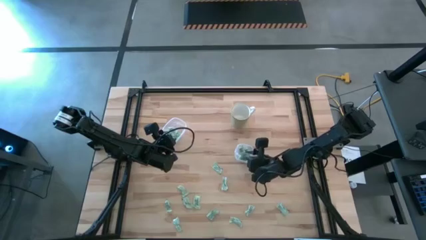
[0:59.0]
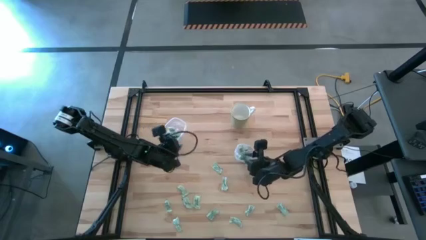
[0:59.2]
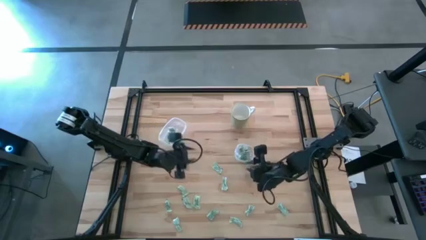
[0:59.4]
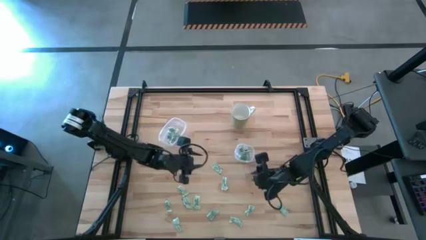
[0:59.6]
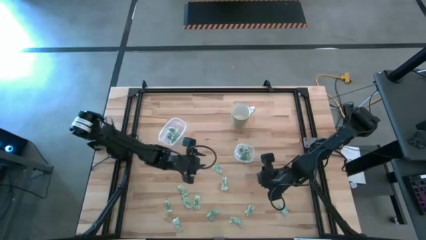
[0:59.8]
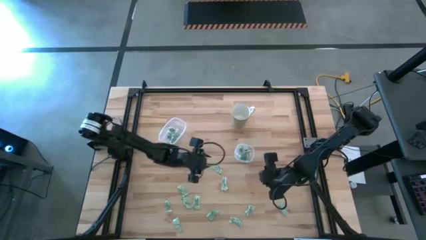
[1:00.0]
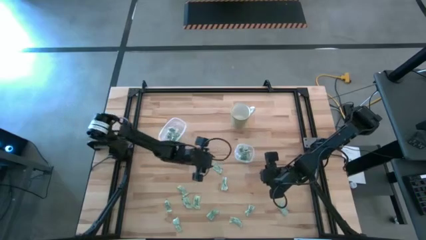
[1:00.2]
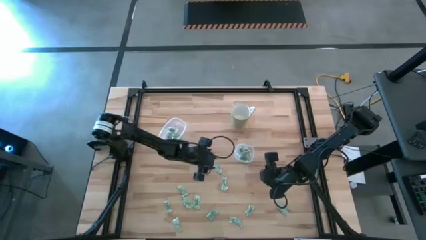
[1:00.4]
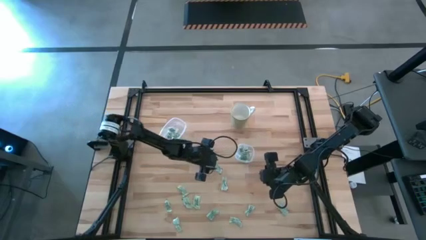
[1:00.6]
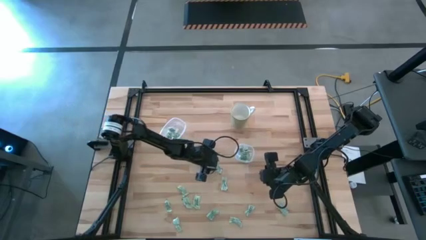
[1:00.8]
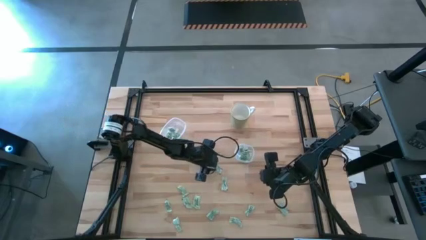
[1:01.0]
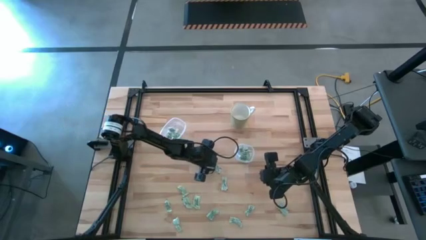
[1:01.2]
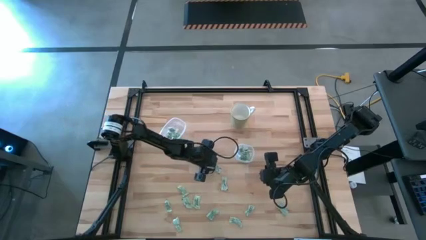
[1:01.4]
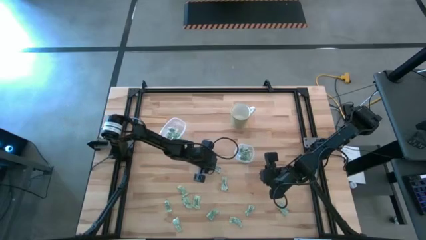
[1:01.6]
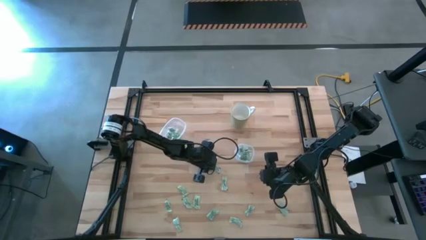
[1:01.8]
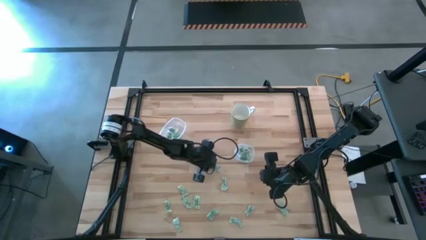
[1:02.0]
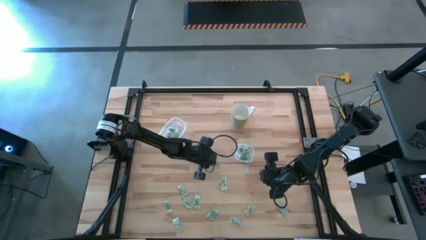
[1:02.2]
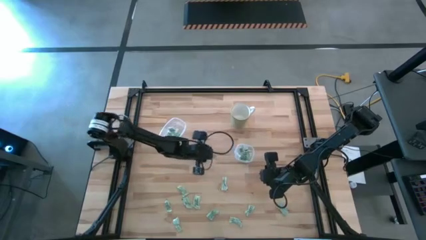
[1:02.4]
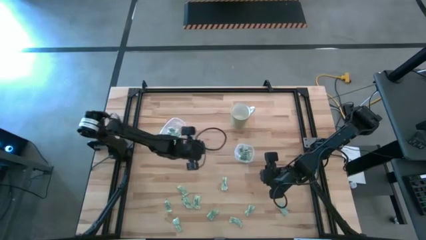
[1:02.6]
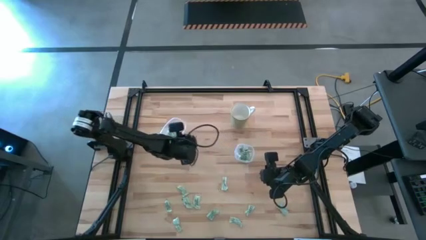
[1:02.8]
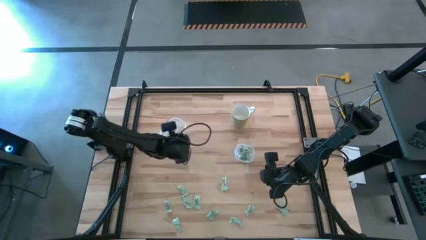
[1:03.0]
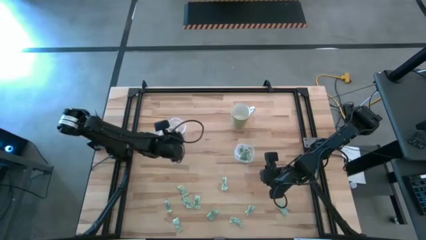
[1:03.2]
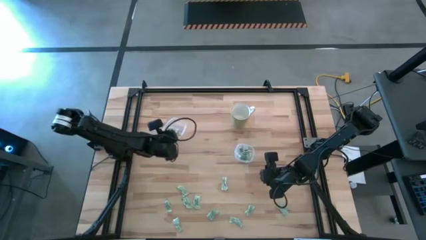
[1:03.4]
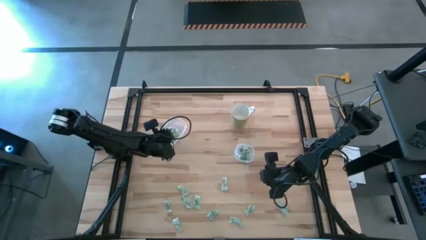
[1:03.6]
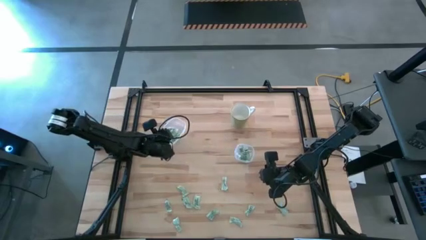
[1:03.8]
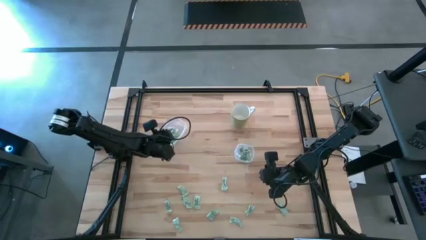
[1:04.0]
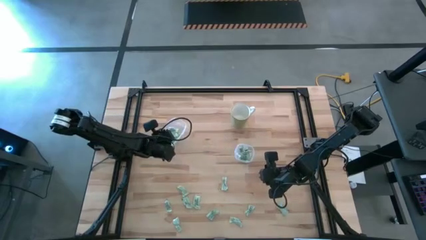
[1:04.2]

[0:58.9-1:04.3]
Task: Pick and place Stevia / Truvia into bins
Put the stevia packet into the left transparent container

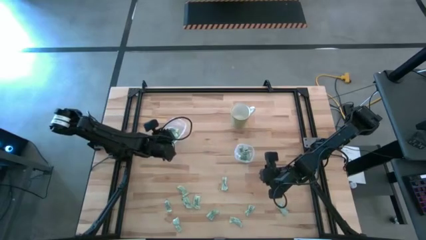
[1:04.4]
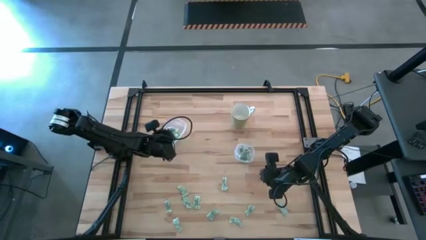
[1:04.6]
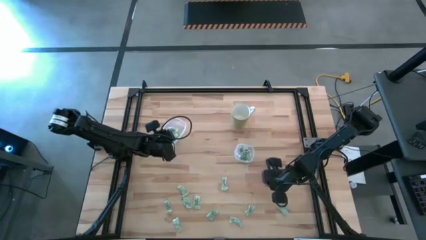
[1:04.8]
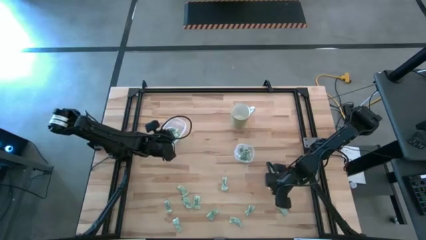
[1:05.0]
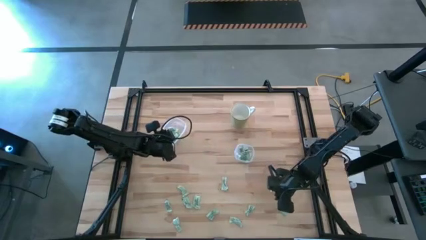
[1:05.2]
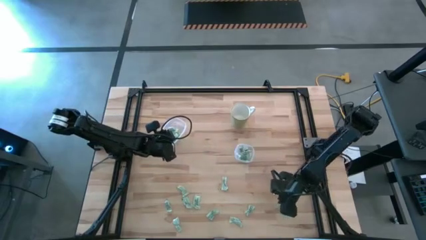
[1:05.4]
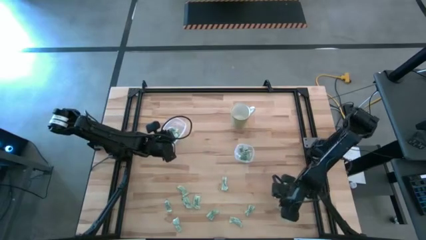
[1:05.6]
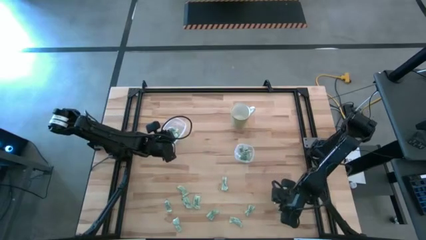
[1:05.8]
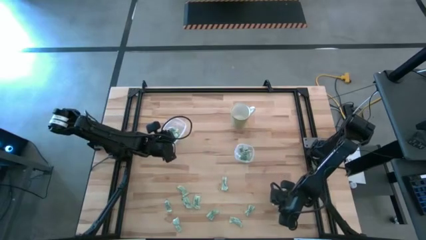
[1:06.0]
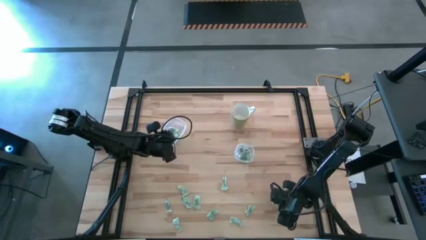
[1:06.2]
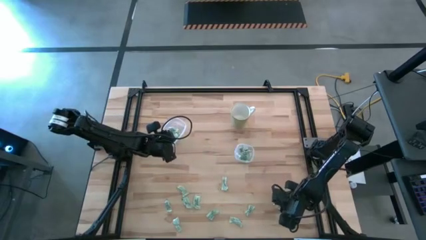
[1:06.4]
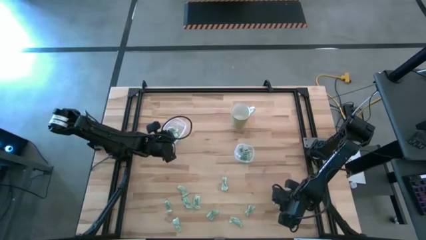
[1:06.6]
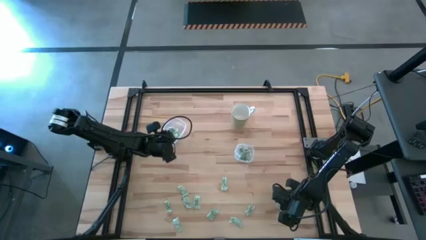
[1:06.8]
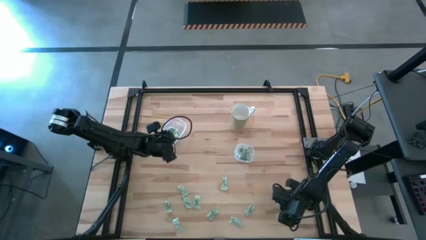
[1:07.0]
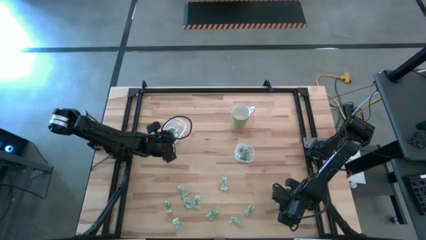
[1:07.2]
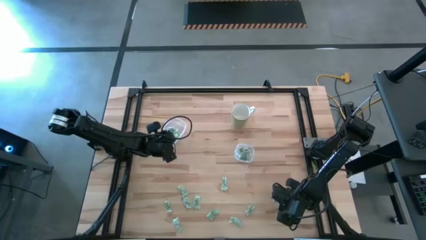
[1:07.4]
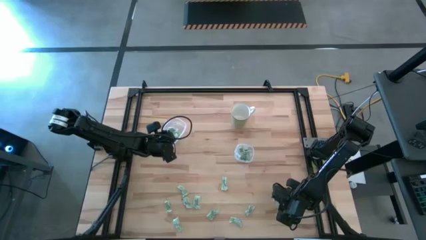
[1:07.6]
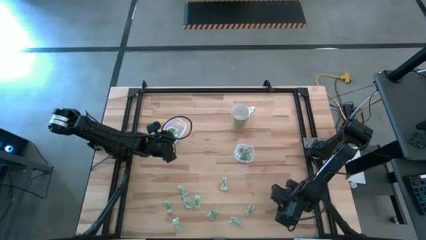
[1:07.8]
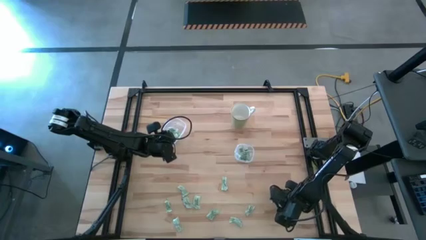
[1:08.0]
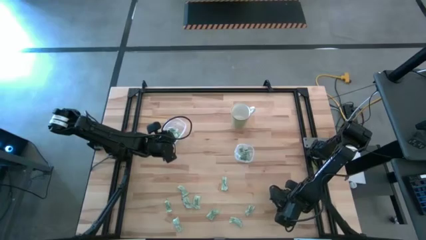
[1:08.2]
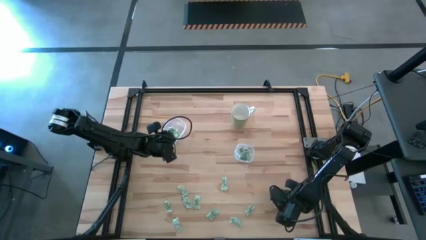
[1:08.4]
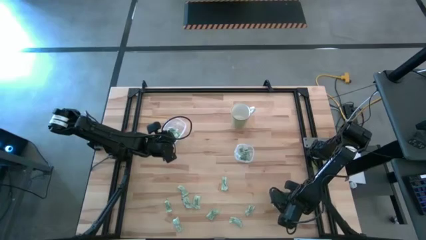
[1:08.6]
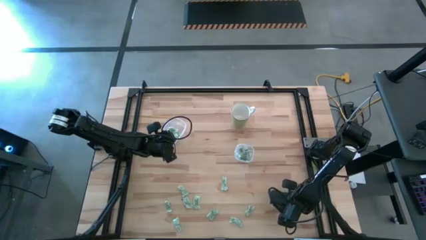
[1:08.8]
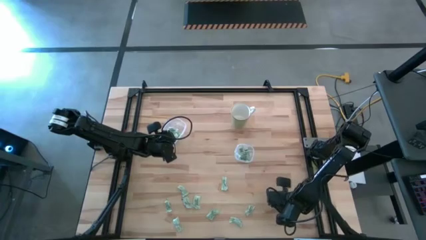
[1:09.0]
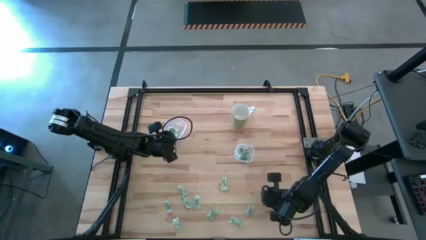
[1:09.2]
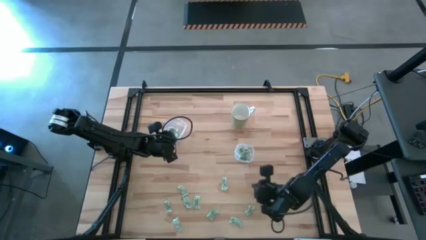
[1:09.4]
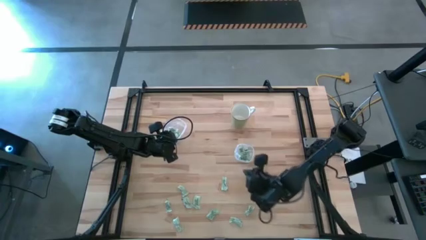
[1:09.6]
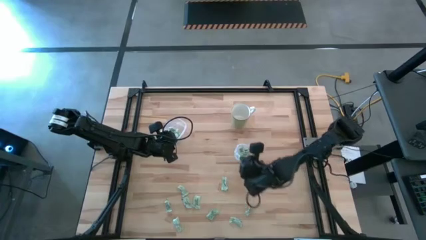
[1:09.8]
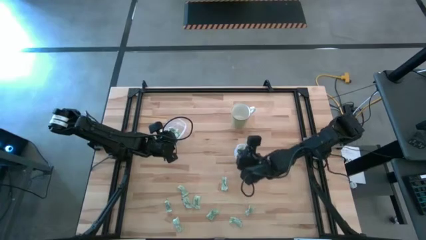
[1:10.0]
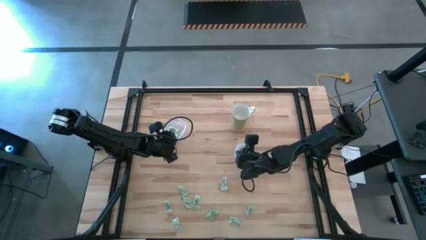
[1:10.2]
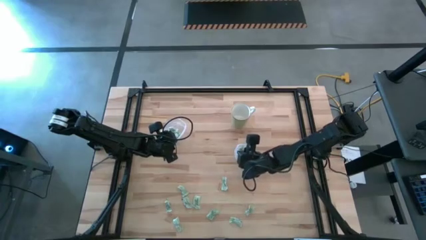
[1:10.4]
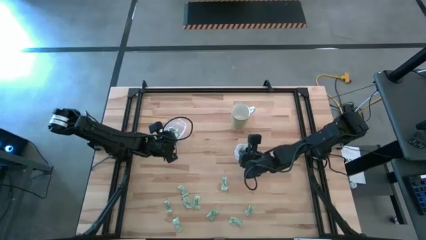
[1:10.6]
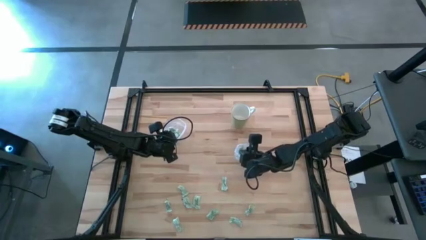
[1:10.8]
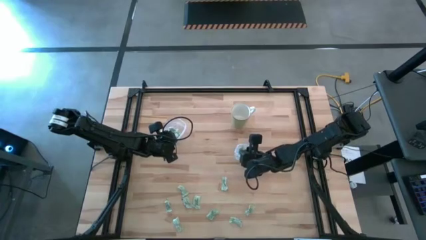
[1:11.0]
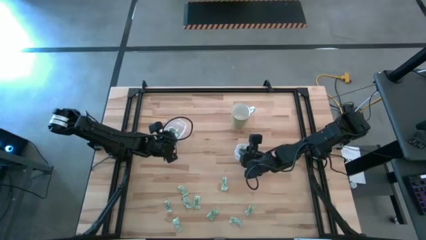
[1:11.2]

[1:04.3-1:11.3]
Put the stevia packet into the right transparent container

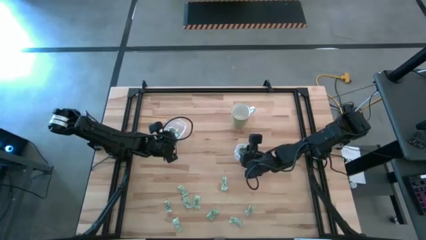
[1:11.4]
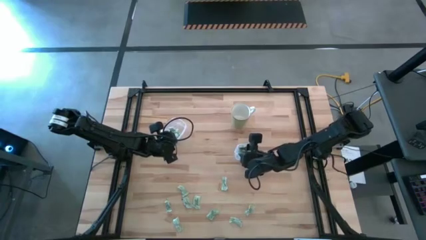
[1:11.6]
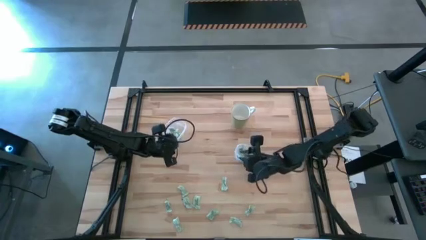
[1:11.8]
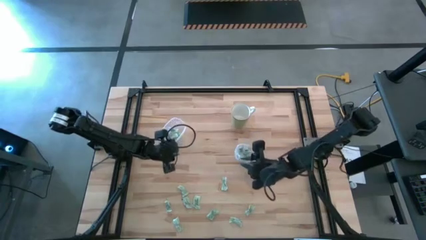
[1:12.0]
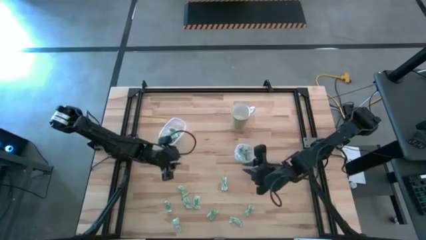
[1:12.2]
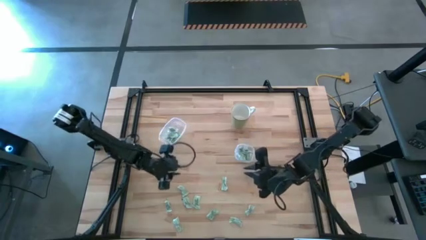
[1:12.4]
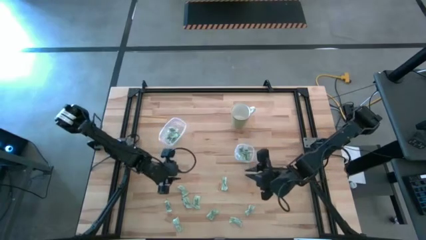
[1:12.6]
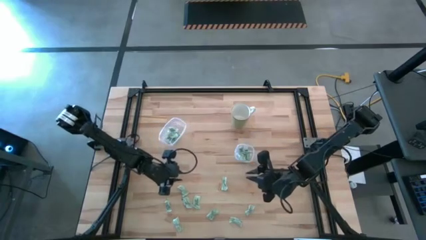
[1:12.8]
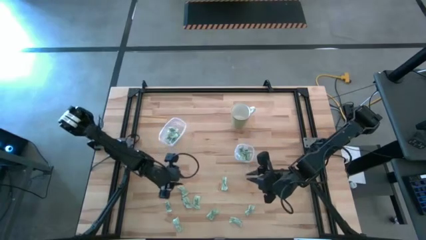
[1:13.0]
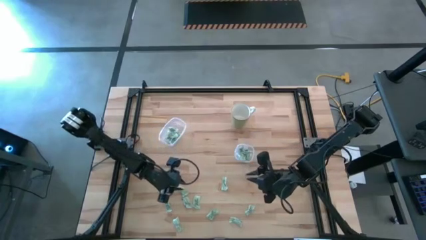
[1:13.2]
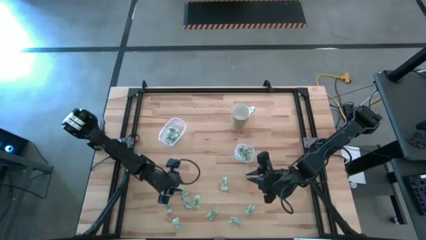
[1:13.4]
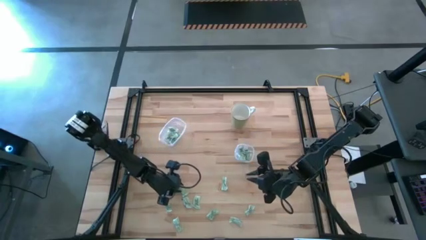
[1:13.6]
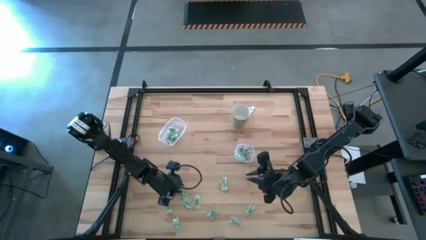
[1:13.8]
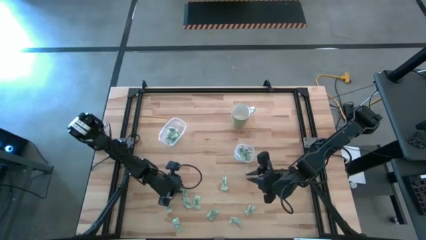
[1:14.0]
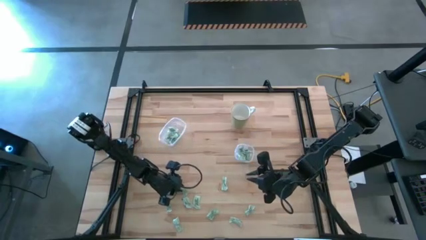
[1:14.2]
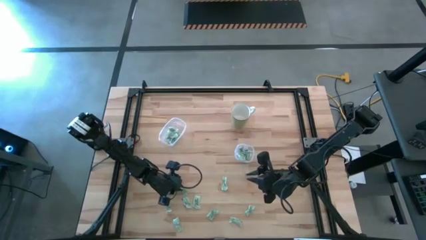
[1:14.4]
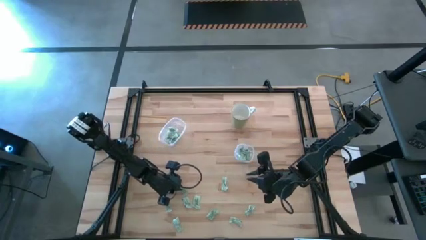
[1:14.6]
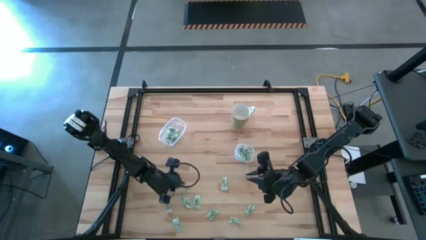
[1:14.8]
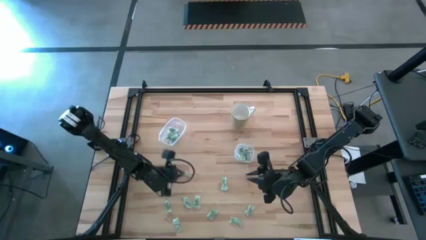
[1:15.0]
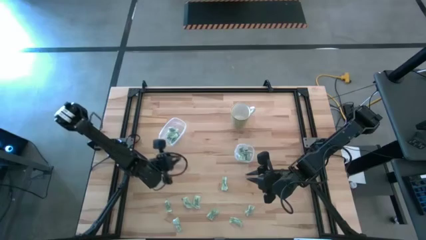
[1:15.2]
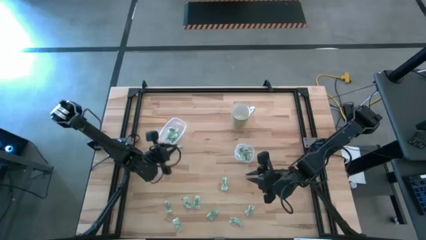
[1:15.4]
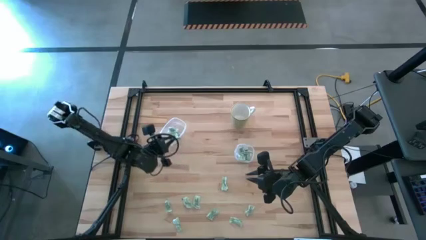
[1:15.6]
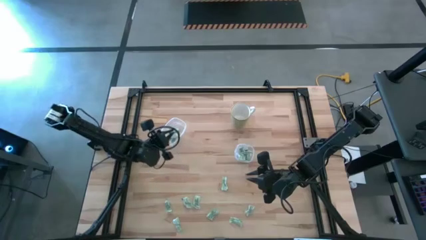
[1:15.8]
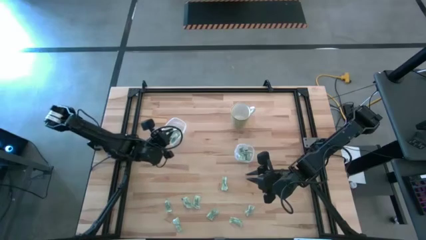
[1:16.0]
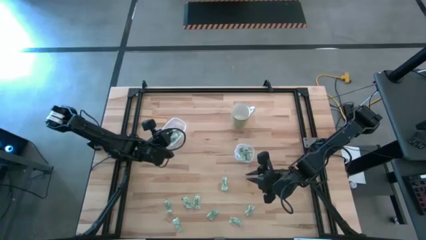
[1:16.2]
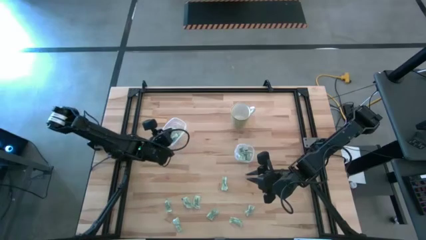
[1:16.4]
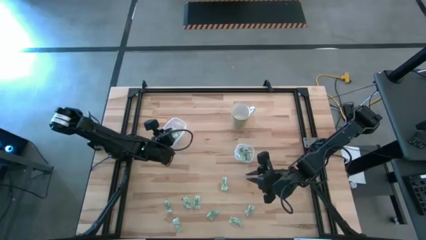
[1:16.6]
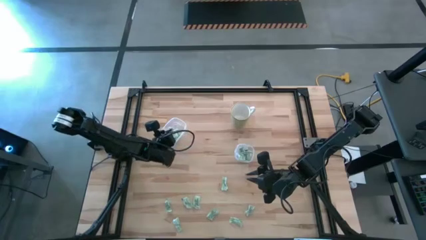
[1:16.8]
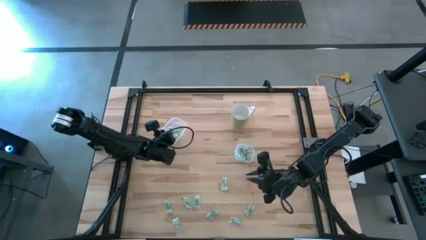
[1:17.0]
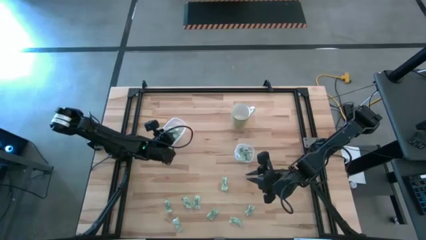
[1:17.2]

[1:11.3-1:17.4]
Put the stevia packet into the left transparent container
